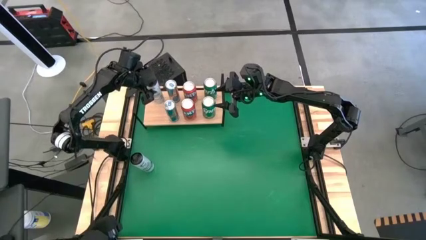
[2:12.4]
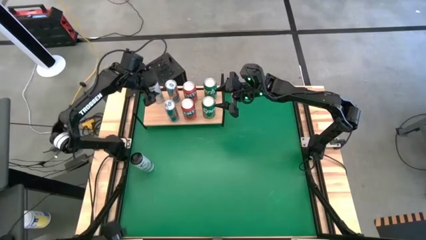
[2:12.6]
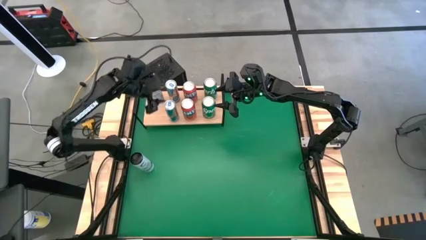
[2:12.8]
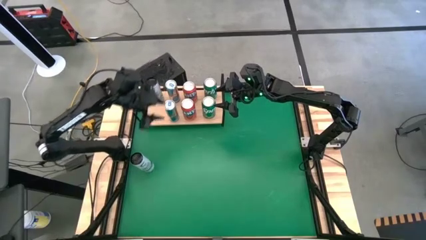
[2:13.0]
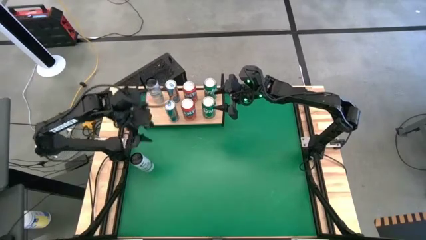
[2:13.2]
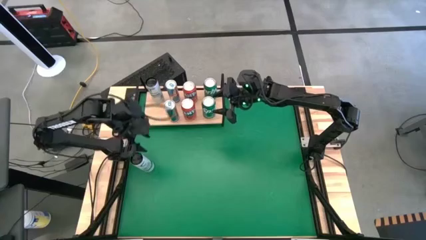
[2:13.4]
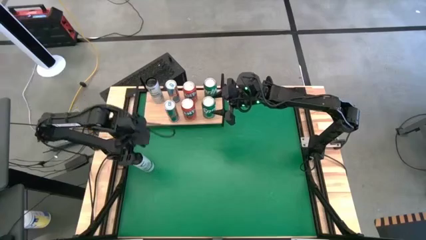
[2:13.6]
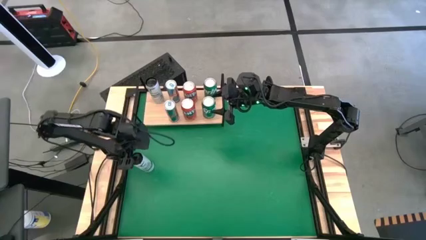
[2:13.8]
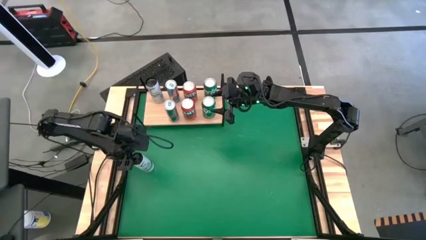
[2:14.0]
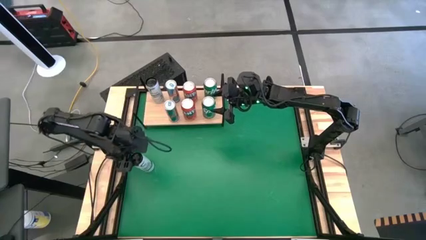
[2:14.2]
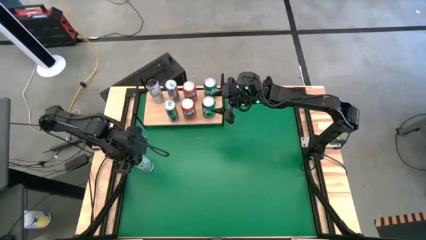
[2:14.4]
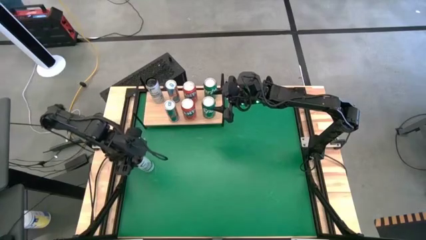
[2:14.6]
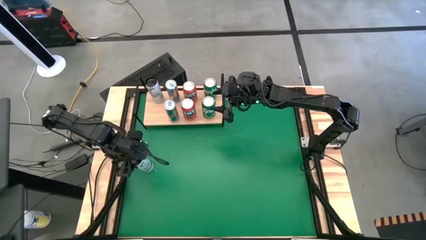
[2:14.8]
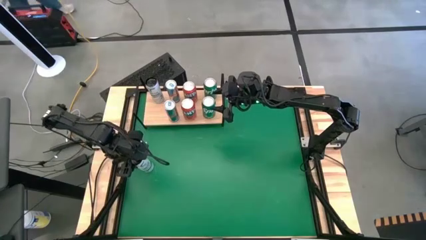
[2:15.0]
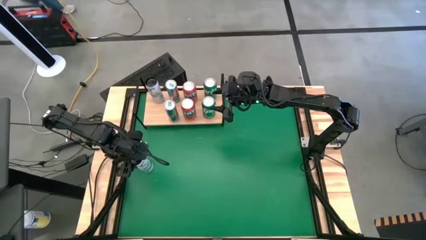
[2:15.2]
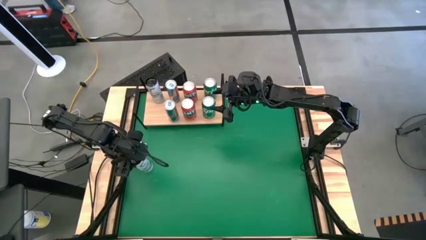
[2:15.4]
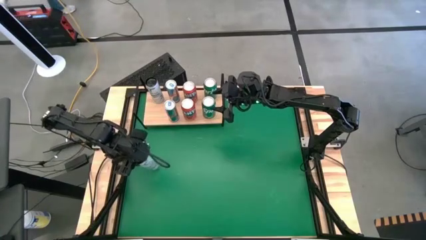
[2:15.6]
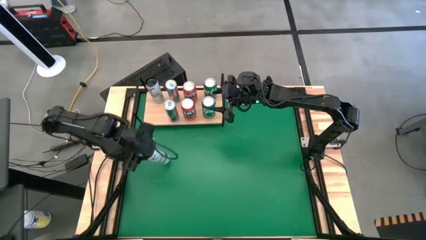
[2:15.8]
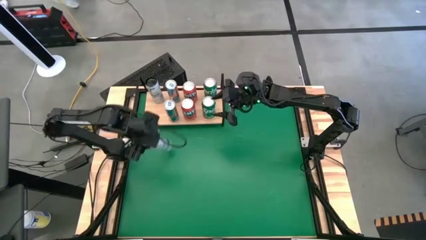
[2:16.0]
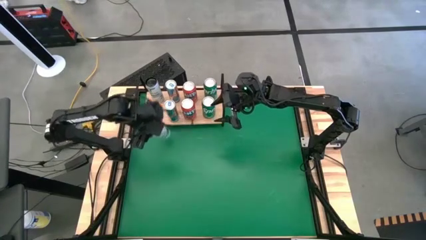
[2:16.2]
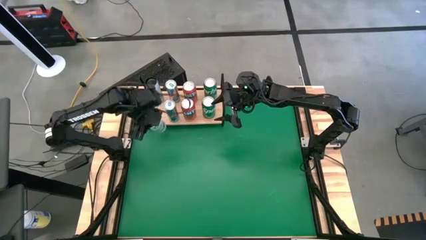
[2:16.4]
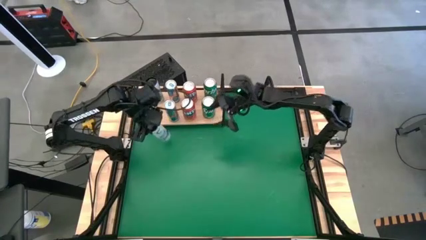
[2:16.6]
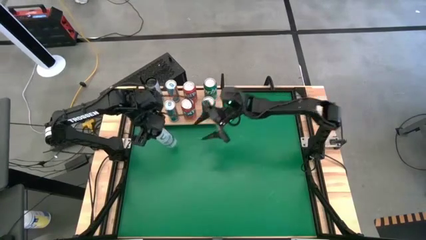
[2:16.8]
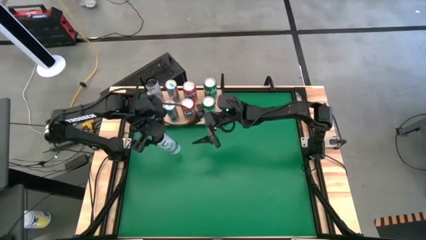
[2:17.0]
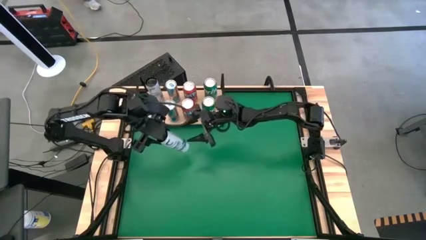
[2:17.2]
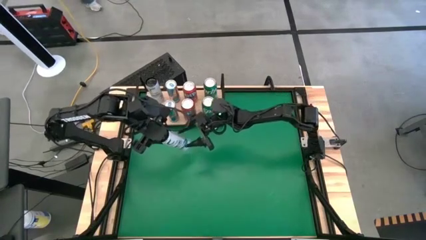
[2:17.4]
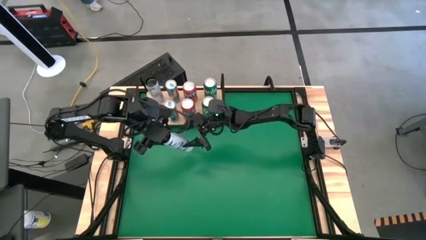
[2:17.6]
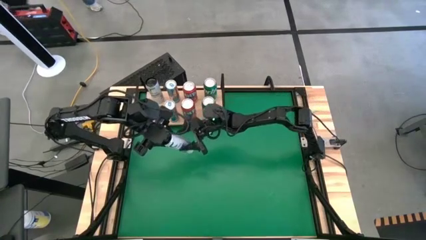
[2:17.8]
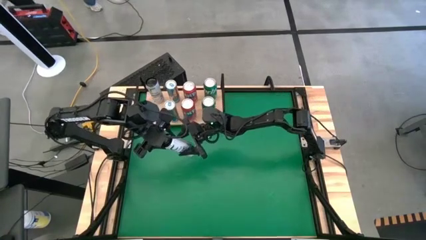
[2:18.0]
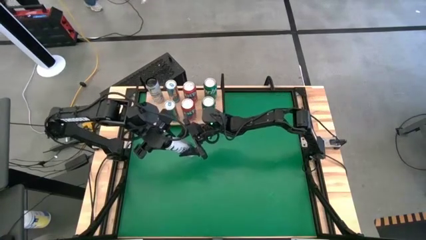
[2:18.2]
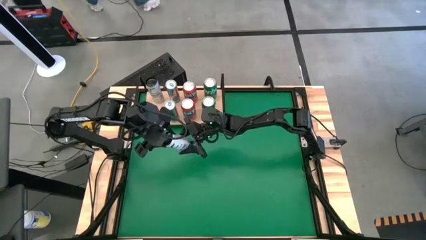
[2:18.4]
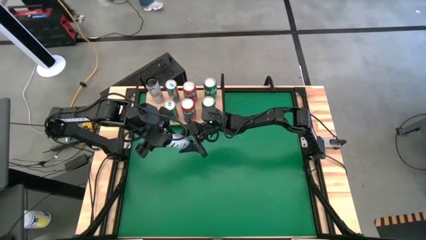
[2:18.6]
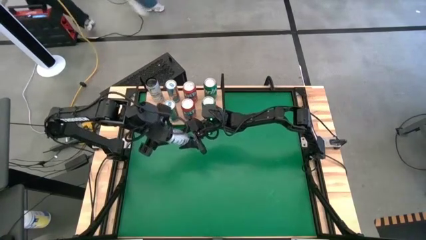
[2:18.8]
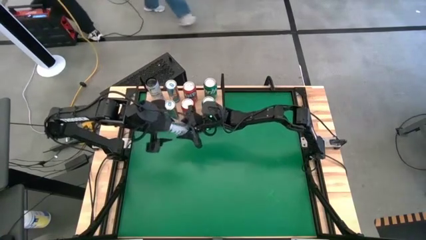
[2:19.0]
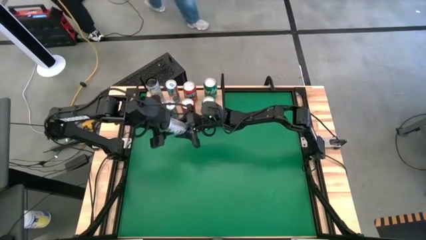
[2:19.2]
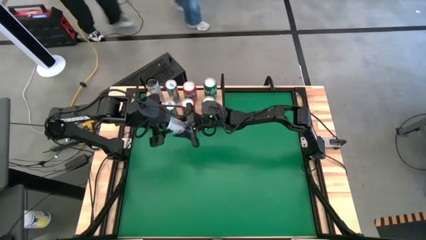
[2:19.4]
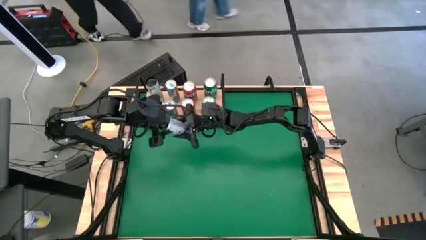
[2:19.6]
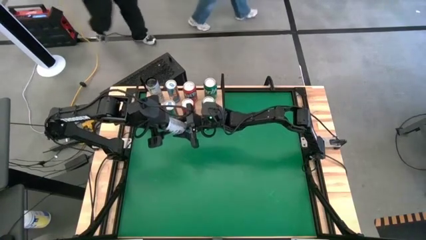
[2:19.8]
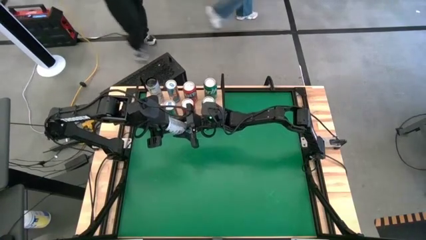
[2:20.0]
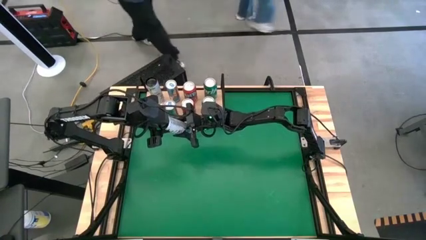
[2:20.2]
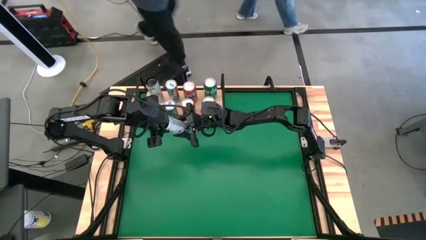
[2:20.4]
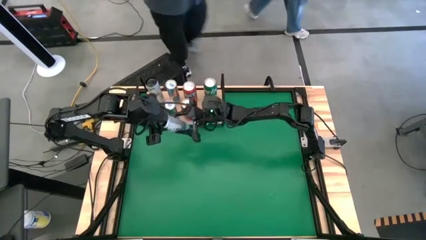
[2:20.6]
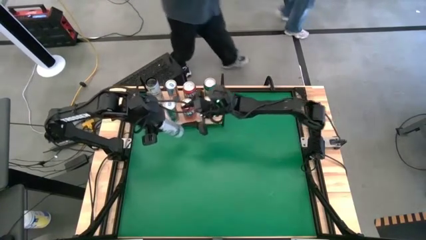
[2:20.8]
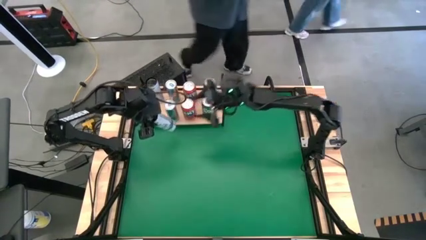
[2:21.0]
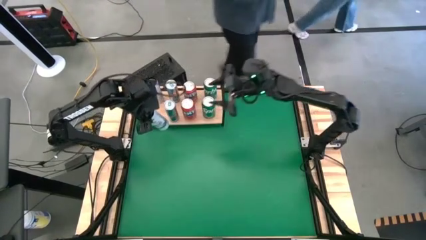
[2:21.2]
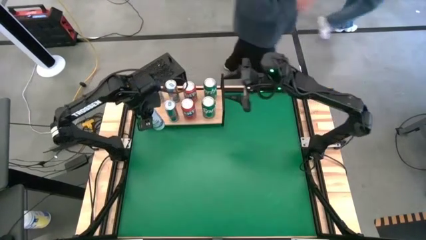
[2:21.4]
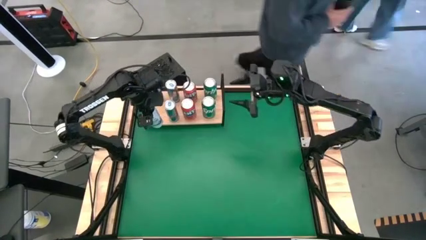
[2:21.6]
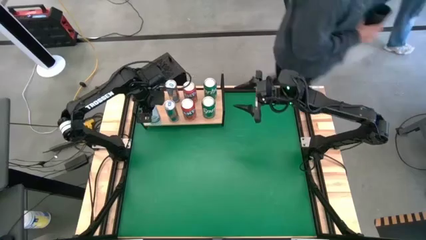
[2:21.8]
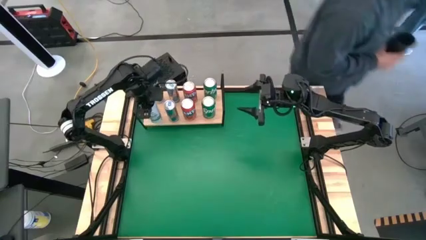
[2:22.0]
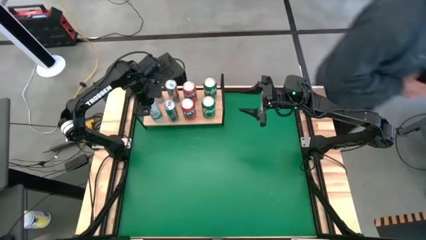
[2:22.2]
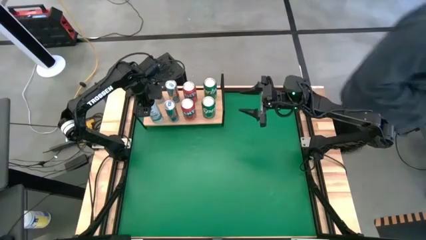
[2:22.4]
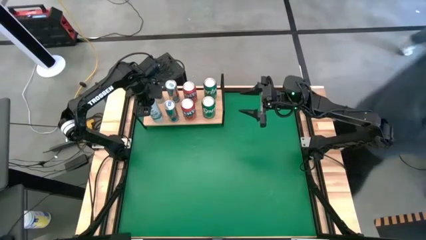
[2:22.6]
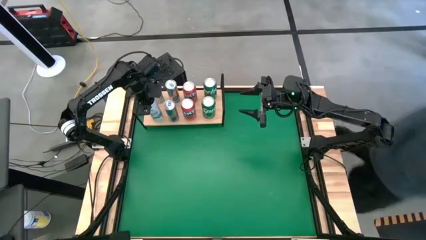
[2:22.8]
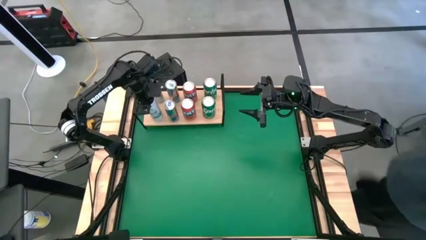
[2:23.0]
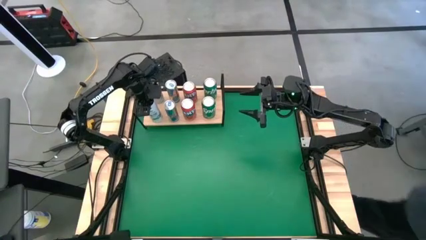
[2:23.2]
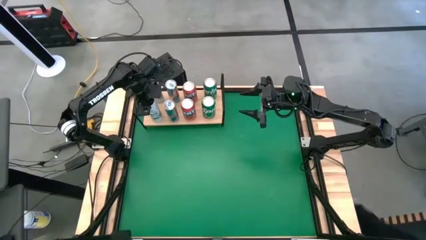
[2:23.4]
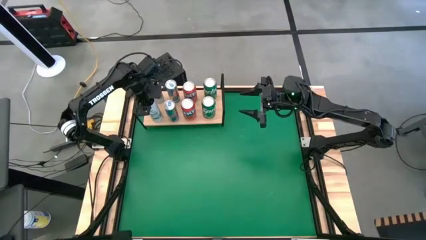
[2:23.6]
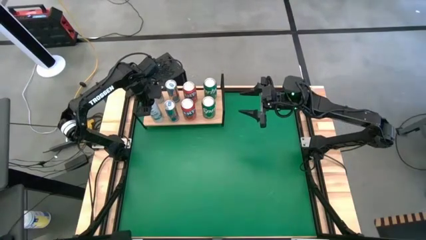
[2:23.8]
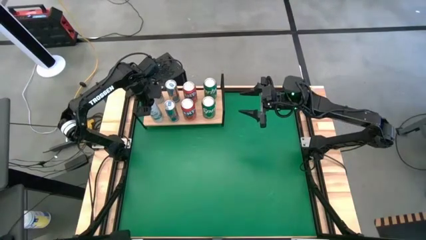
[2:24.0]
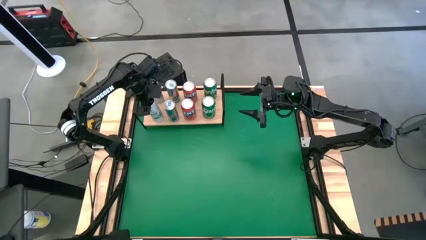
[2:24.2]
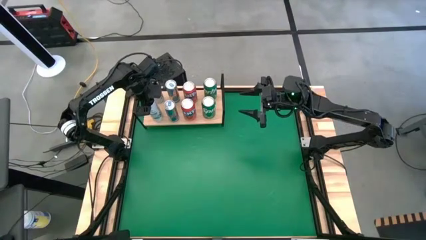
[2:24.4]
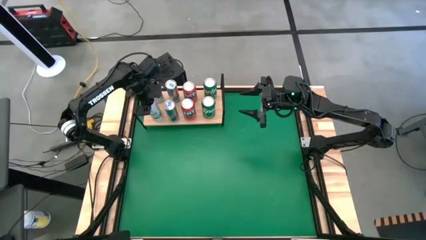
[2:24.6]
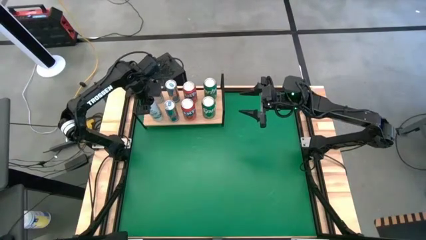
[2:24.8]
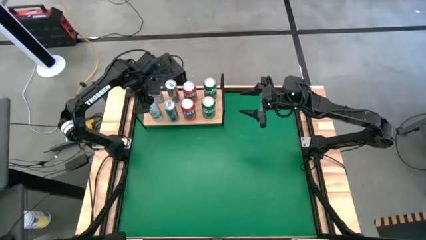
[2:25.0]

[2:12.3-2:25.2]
Task: Place canned beverage on shelf
Put the white-blue soda can aligned with the other white-blue soda can on the shelf

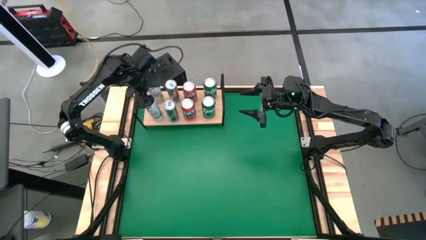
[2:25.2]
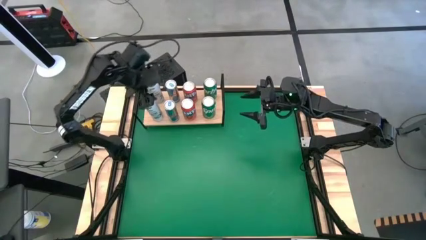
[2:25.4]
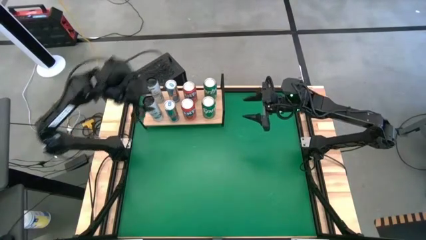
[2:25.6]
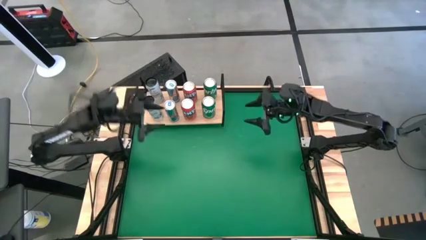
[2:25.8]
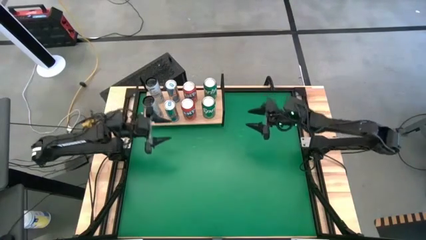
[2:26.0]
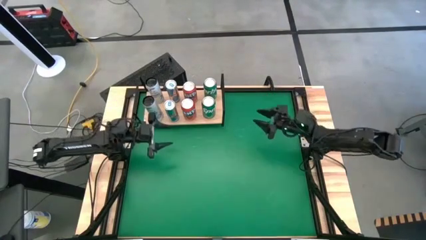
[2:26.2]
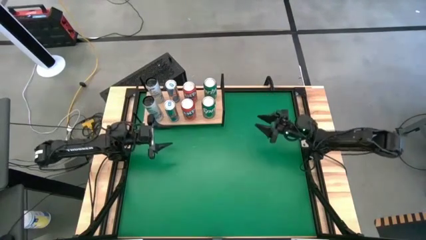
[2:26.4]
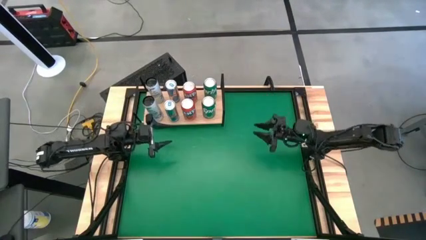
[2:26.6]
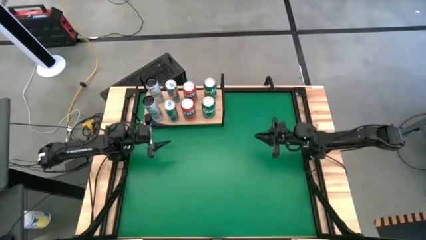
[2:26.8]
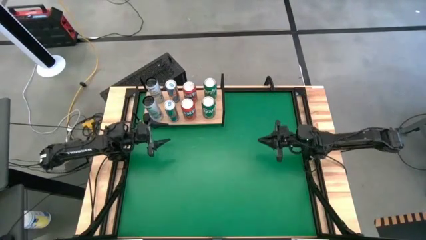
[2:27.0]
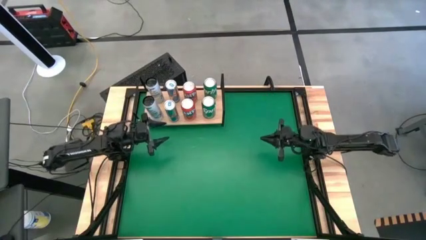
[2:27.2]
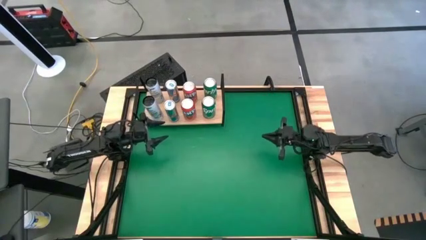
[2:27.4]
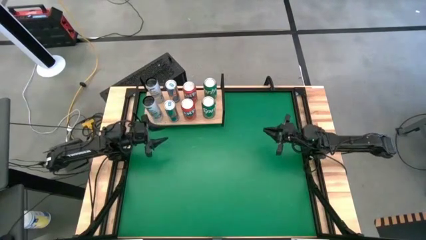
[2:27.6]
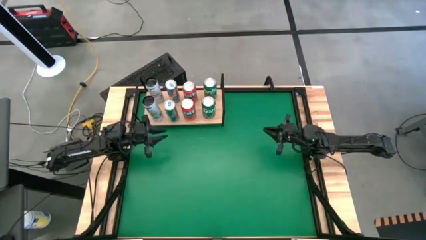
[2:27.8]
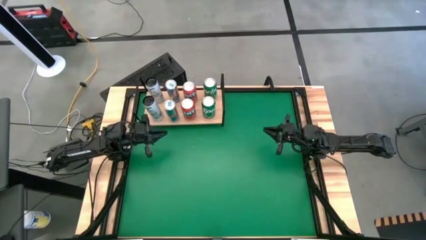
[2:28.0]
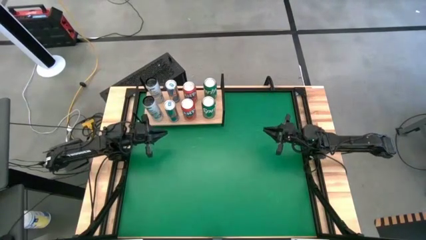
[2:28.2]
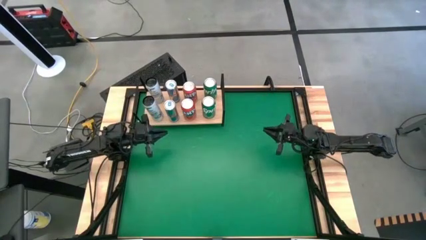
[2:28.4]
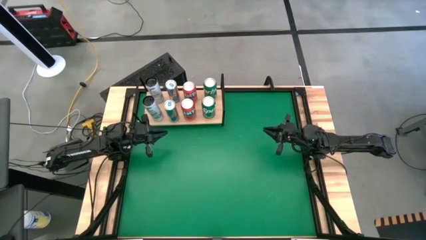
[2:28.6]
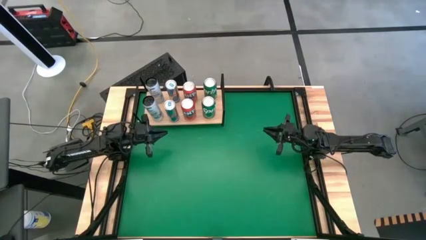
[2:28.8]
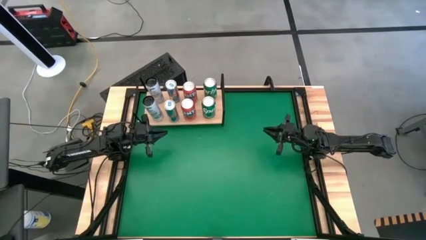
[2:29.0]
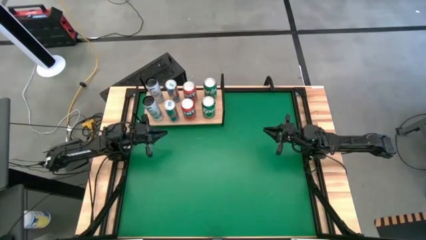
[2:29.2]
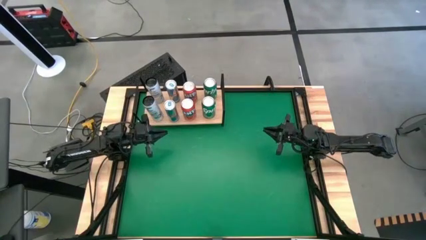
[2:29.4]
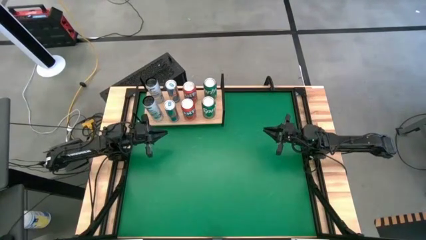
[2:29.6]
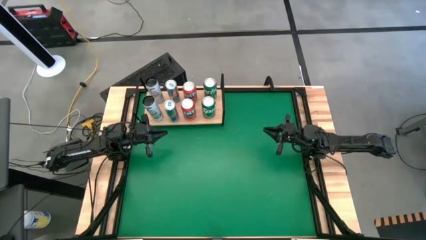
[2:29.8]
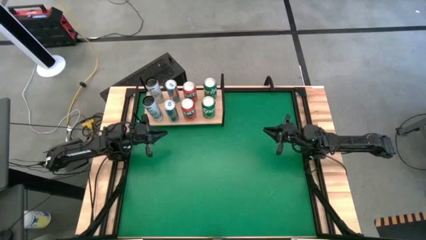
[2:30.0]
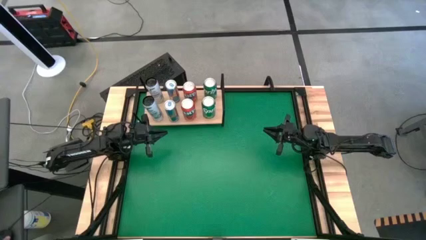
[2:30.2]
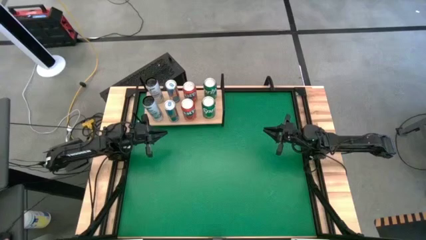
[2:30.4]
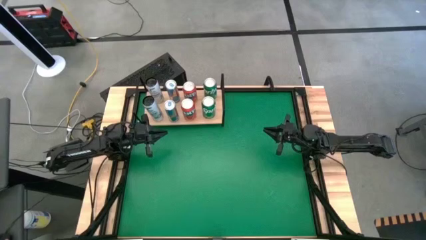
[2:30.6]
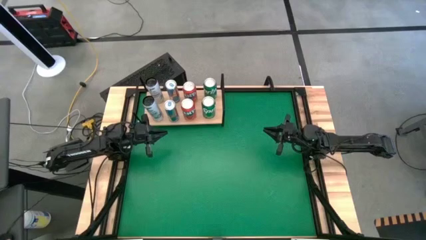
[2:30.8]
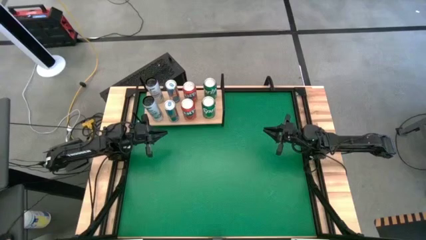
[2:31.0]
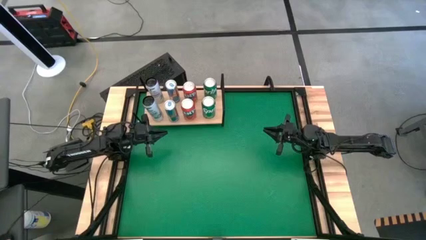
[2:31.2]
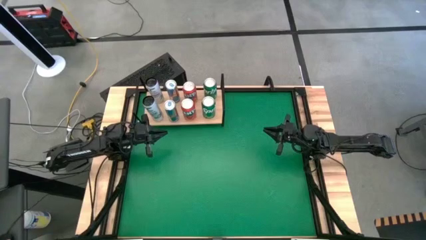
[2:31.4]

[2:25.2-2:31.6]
Return to Home Position
